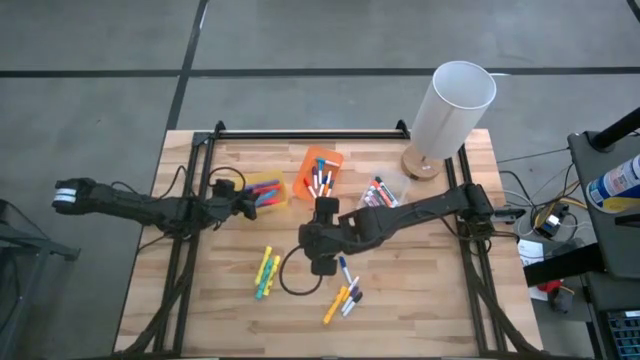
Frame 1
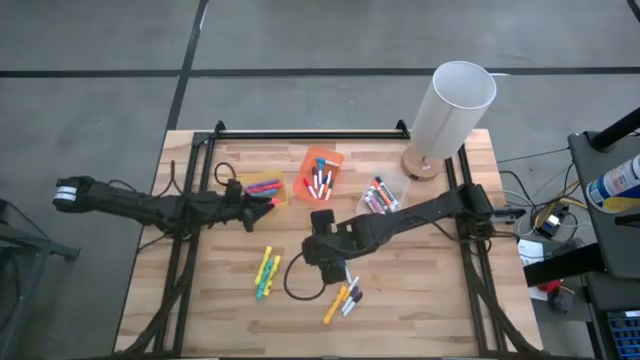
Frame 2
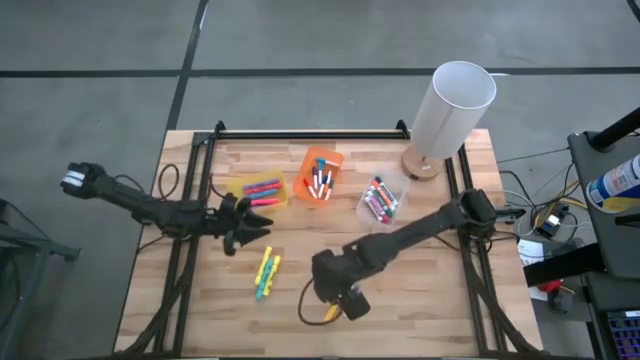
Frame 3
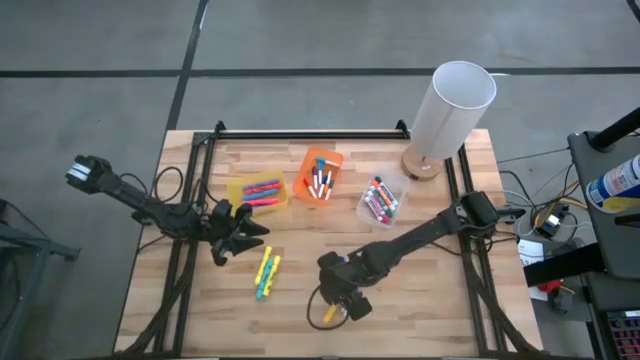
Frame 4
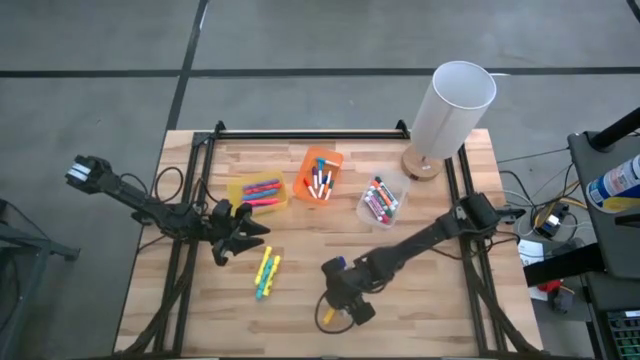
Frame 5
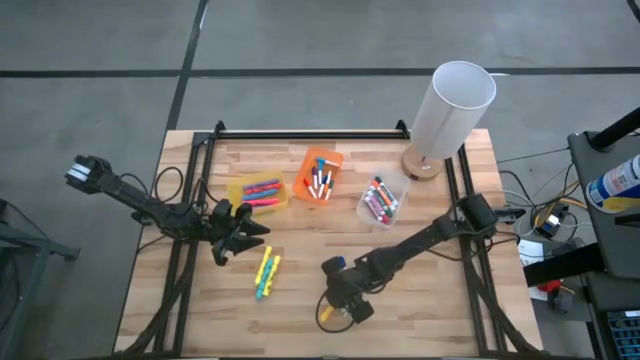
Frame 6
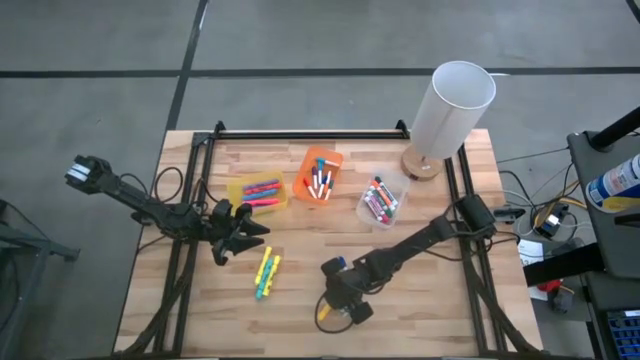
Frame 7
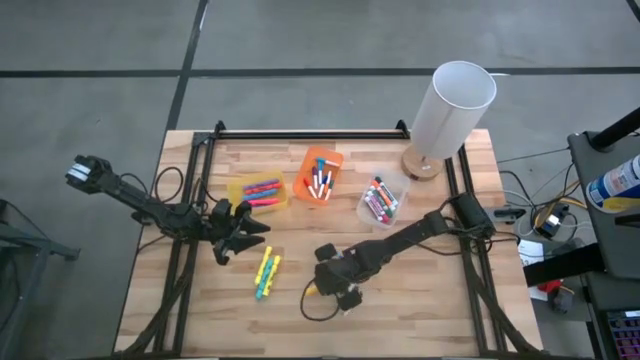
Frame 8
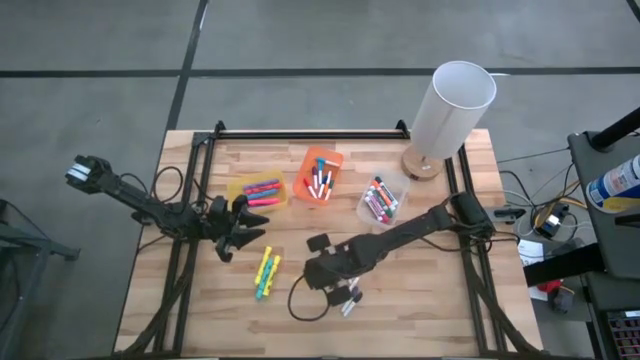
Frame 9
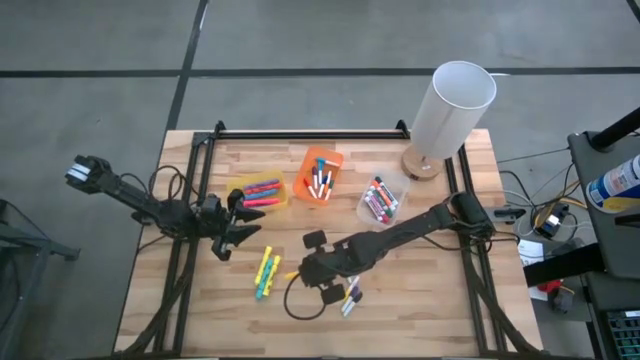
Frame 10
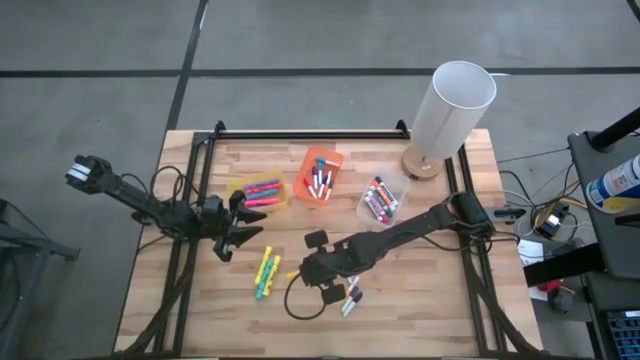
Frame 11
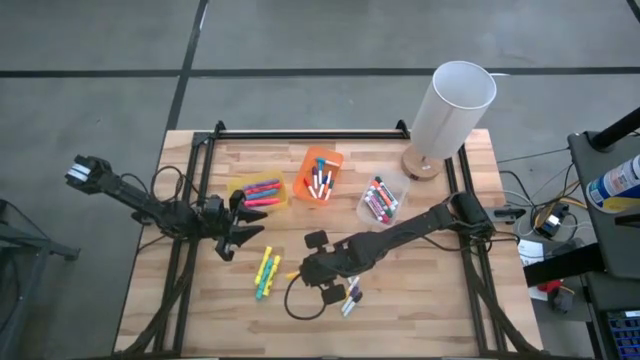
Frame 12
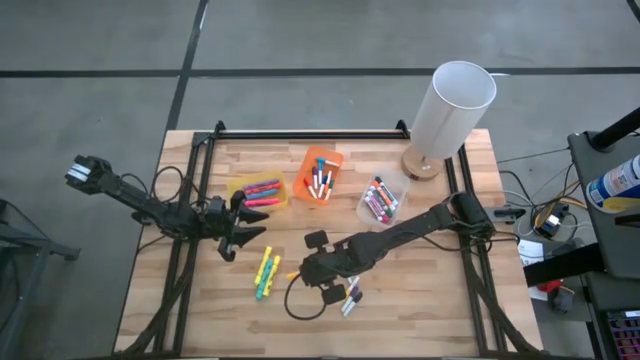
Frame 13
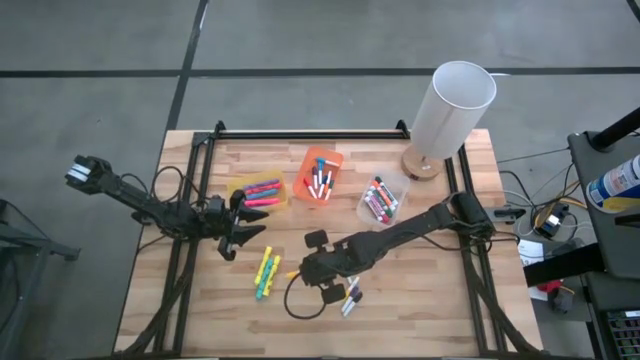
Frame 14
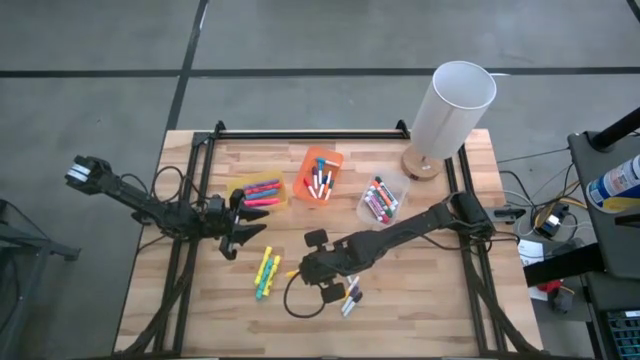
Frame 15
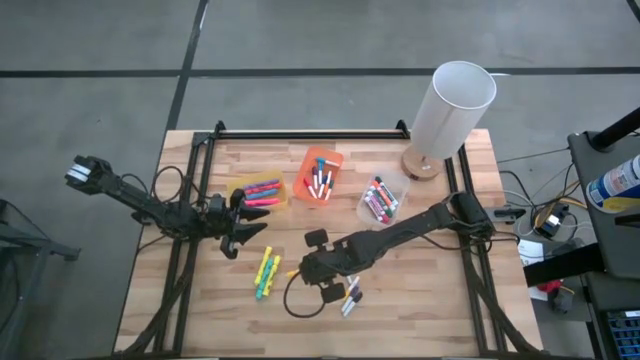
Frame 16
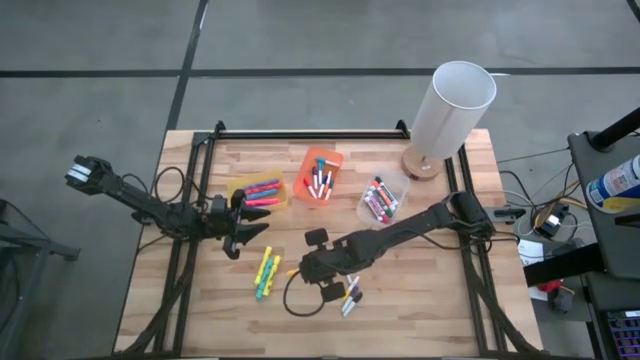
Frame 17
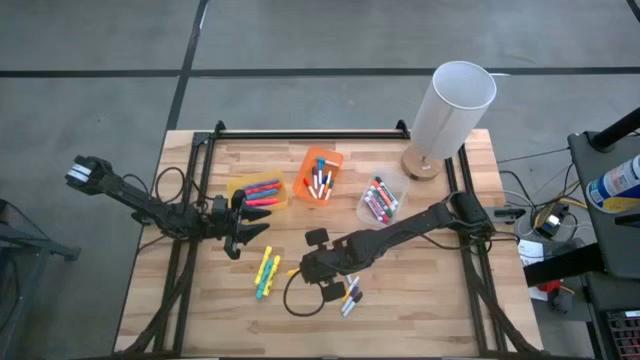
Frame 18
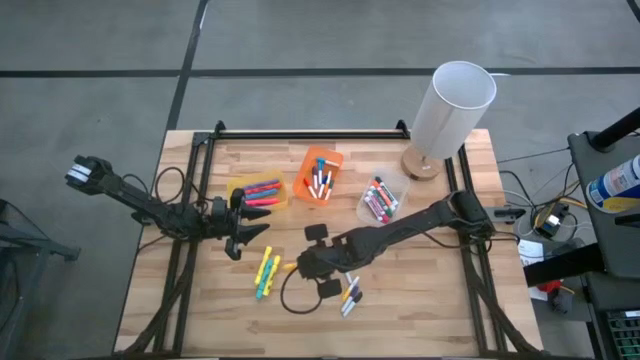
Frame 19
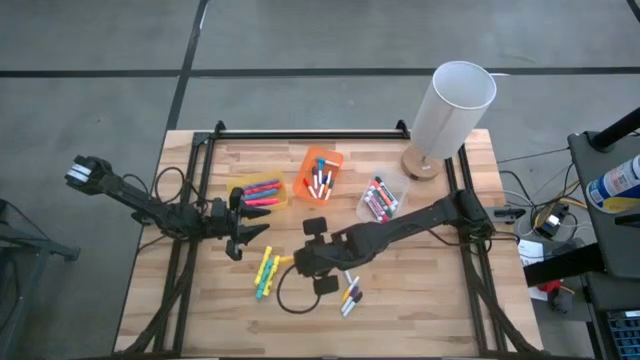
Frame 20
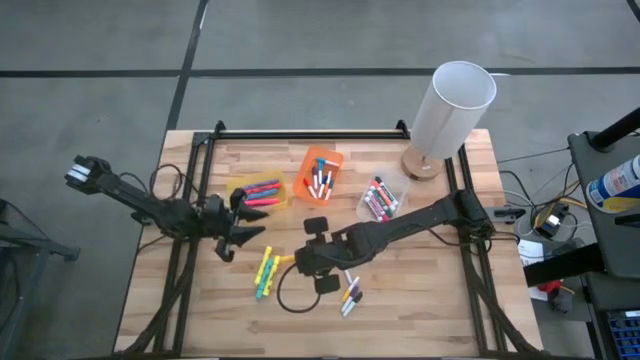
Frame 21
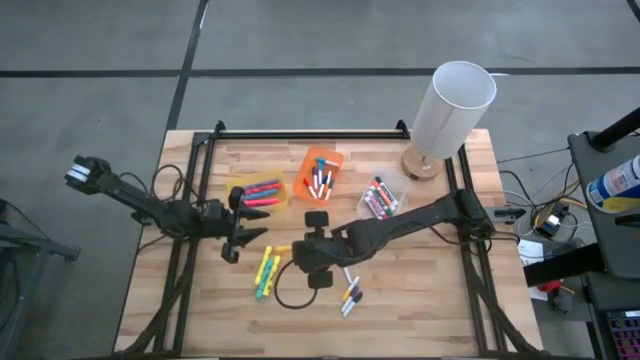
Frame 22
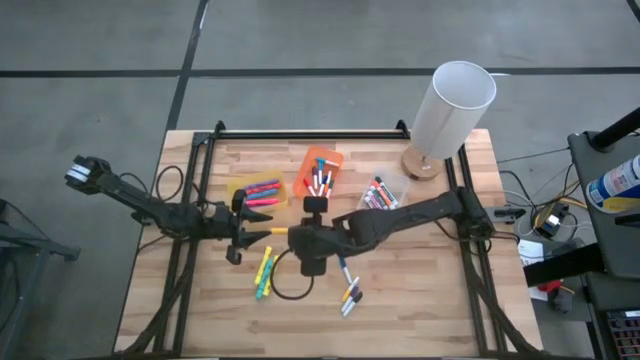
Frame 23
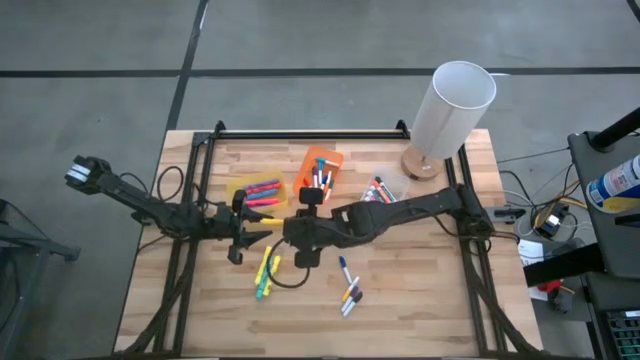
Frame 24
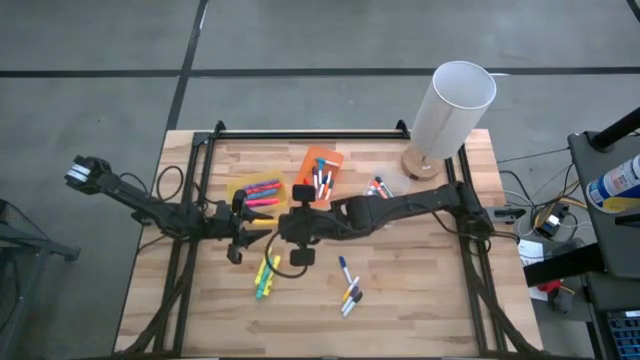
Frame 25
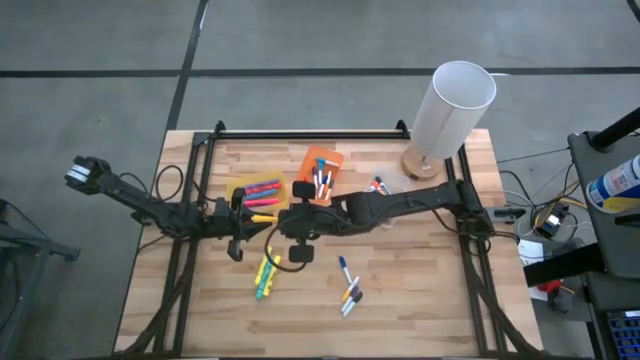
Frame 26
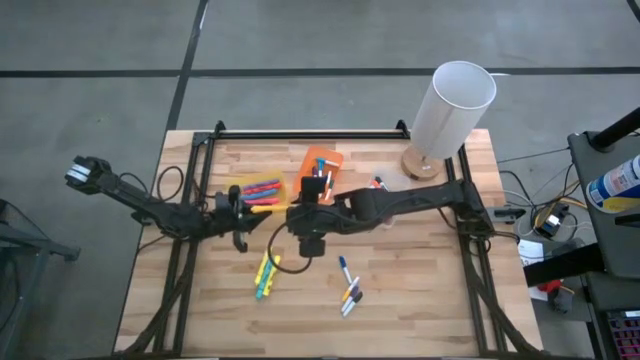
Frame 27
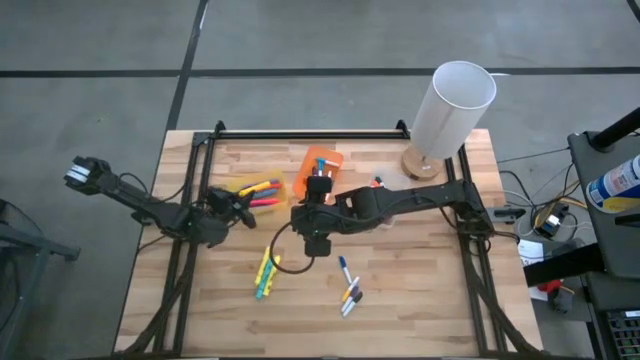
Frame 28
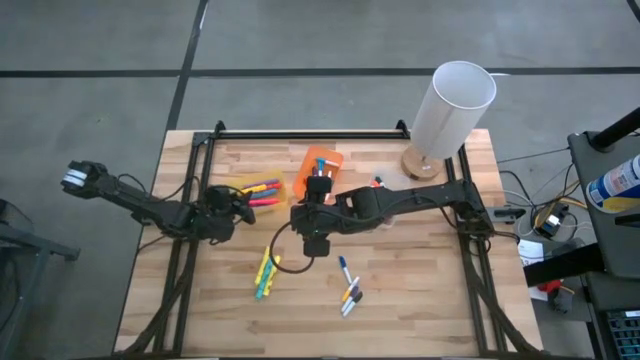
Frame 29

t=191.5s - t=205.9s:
Task: Pick & Place Markers
Put the yellow highlighter pen into the yellow bin

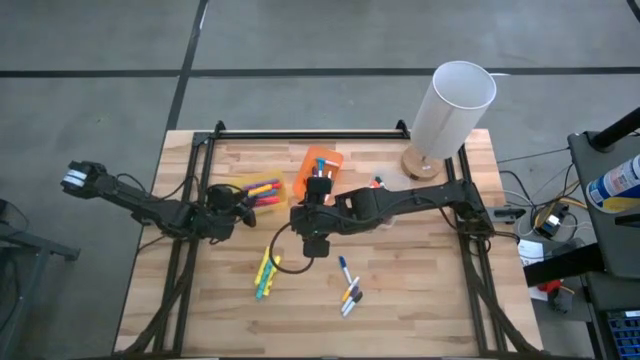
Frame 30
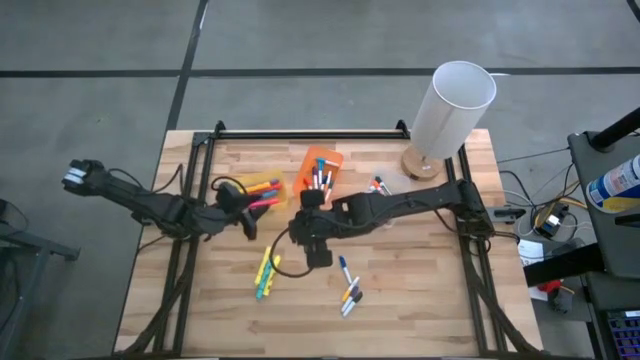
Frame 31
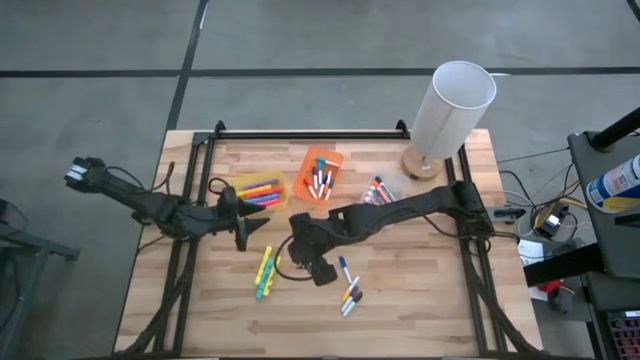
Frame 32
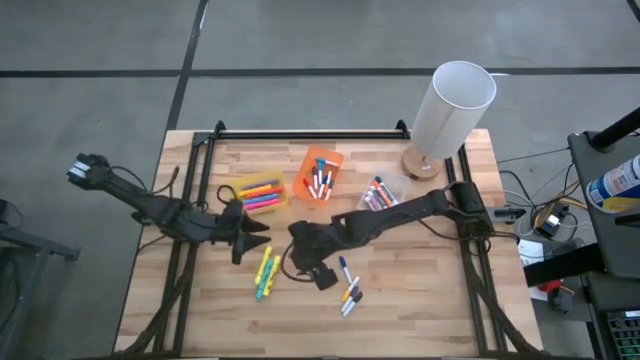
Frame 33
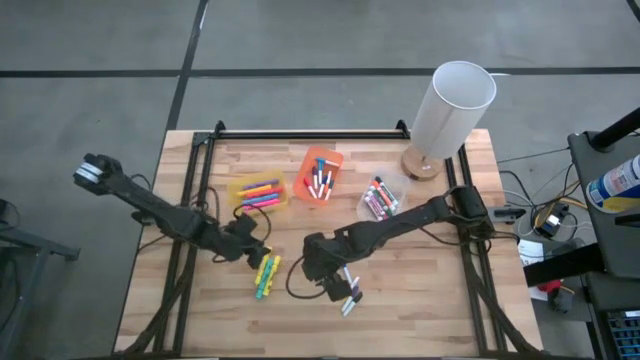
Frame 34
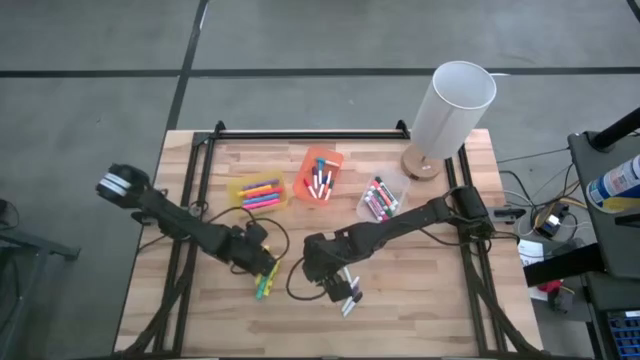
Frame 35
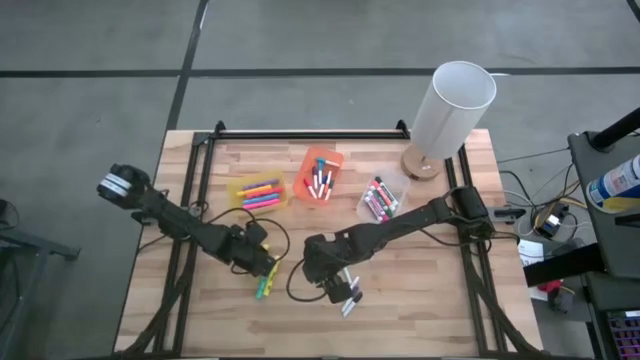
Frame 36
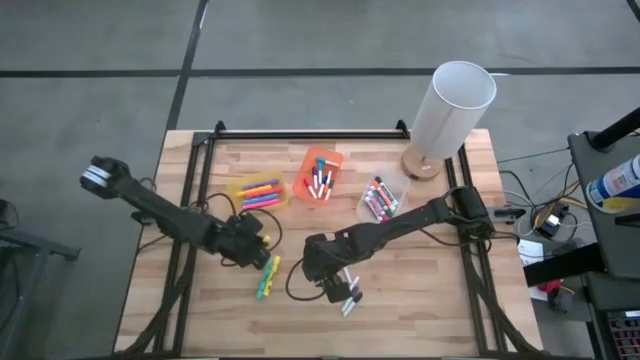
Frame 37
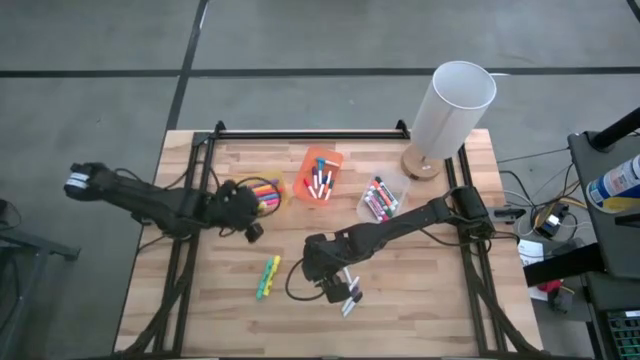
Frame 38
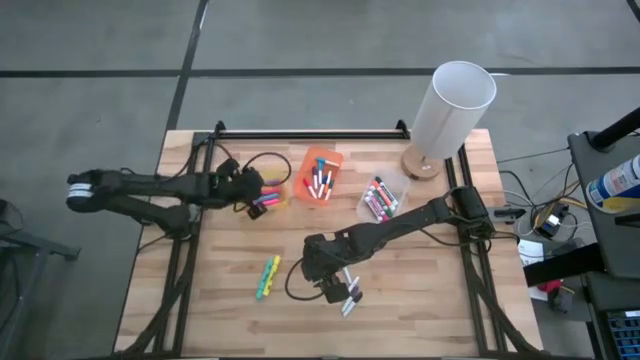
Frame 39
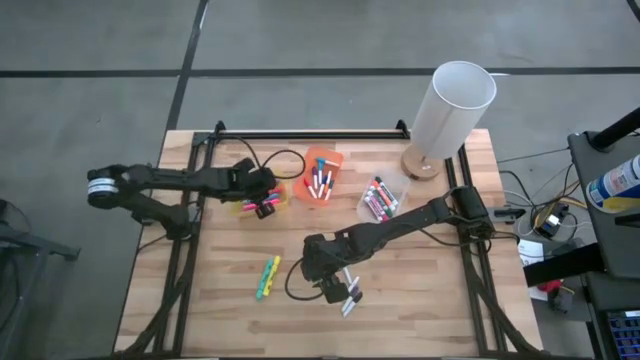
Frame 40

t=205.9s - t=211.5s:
Put the left light yellow highlighter pen into the yellow bin

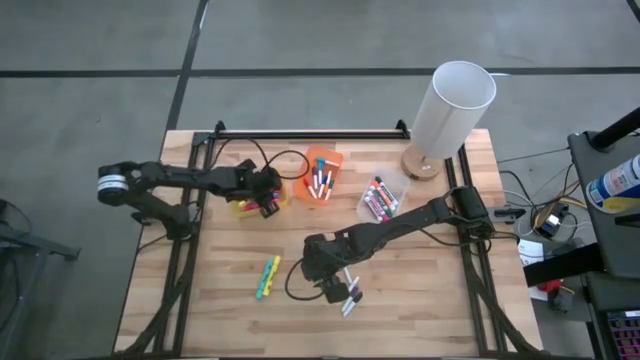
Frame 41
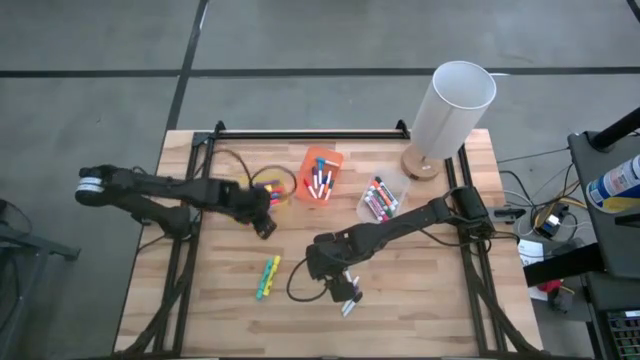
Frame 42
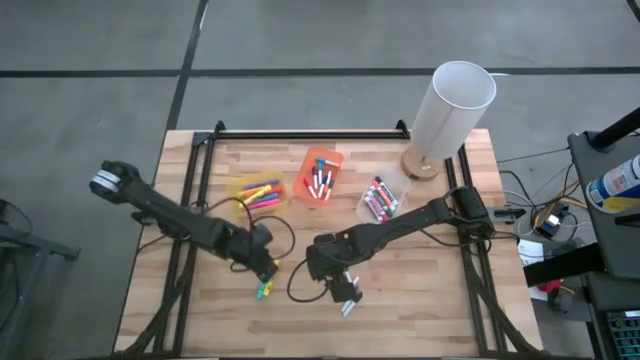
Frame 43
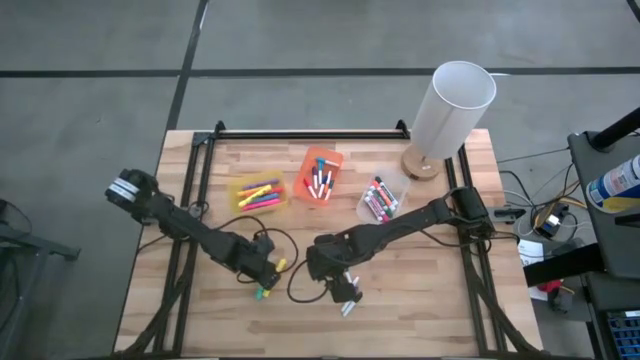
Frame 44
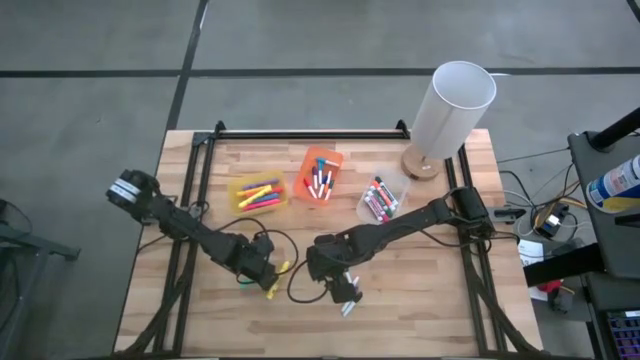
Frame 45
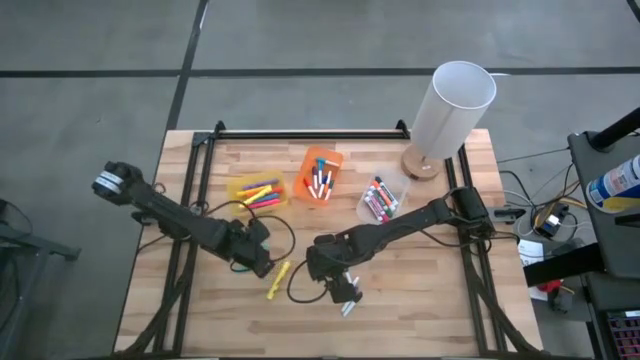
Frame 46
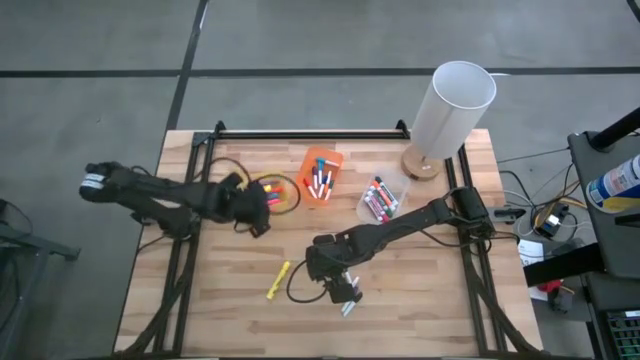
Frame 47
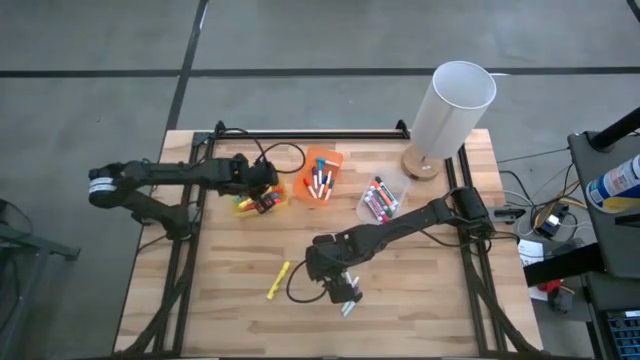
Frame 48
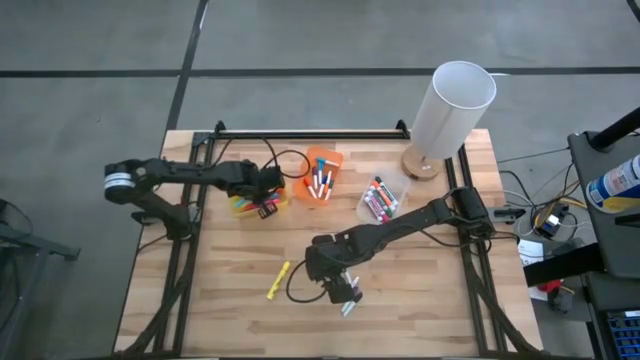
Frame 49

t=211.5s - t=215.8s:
Put the light blue highlighter pen into the yellow bin
